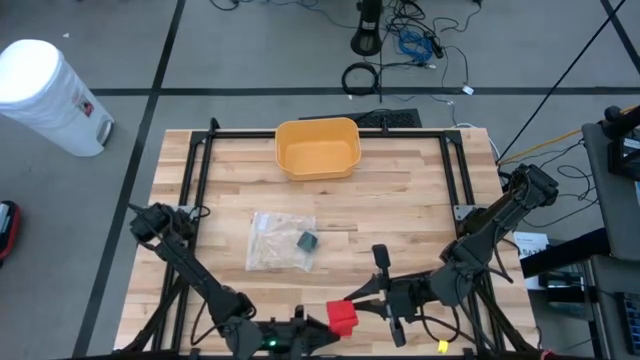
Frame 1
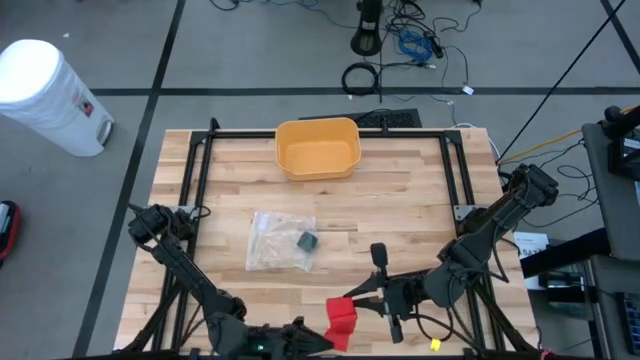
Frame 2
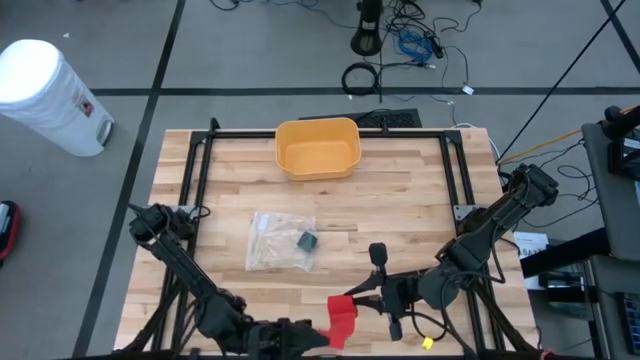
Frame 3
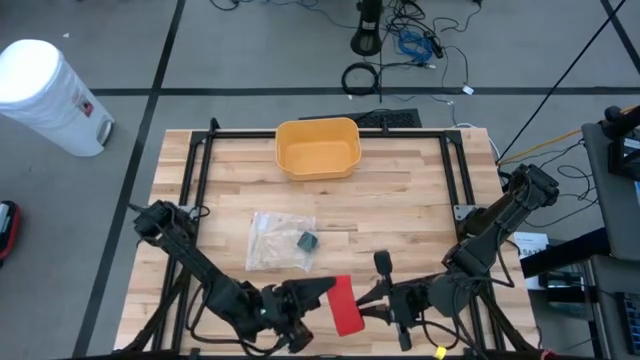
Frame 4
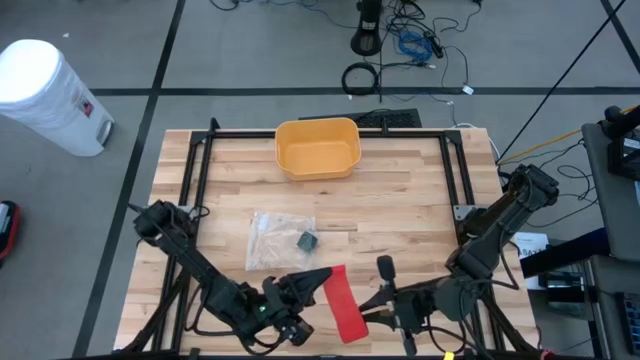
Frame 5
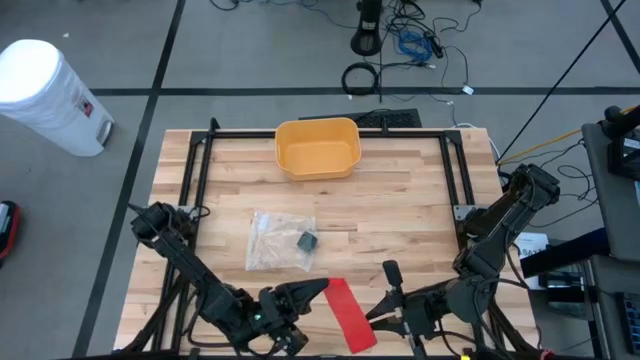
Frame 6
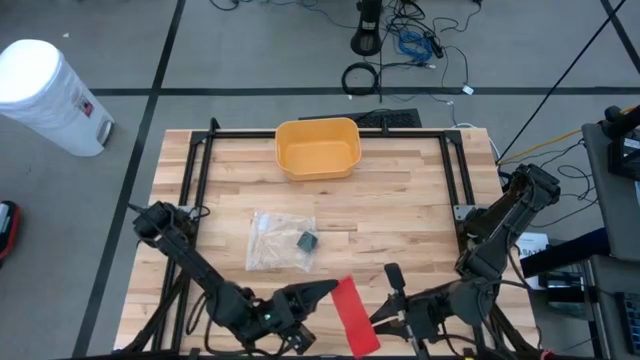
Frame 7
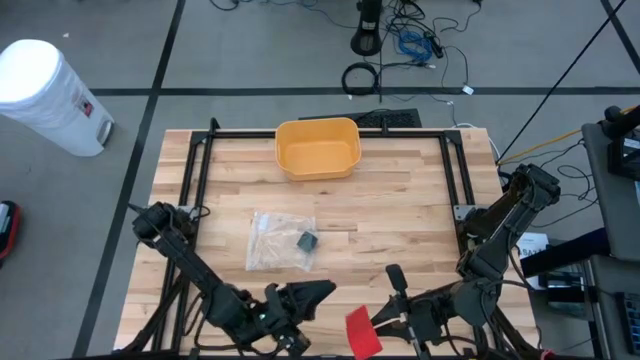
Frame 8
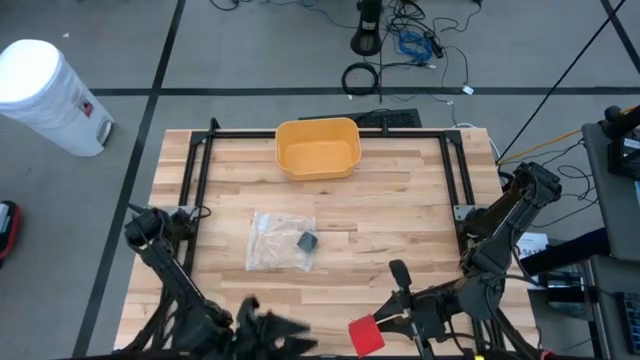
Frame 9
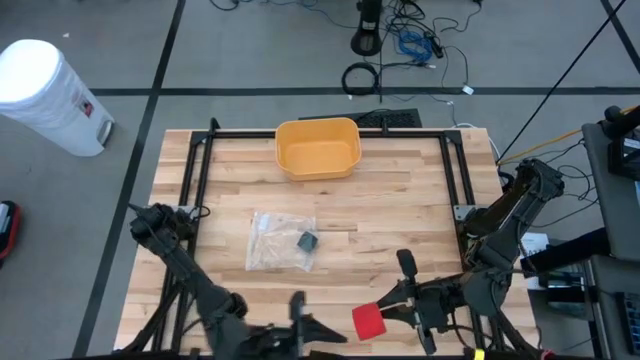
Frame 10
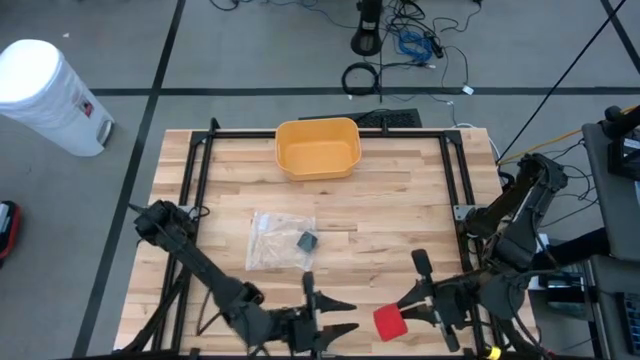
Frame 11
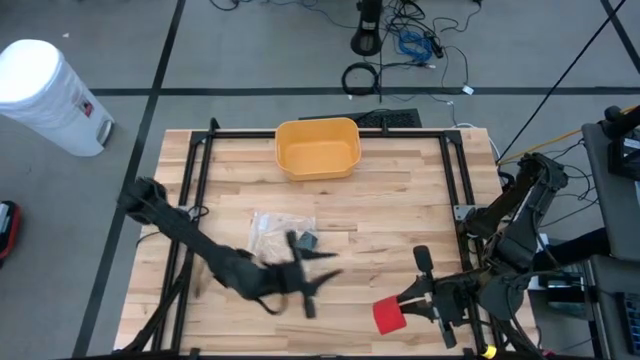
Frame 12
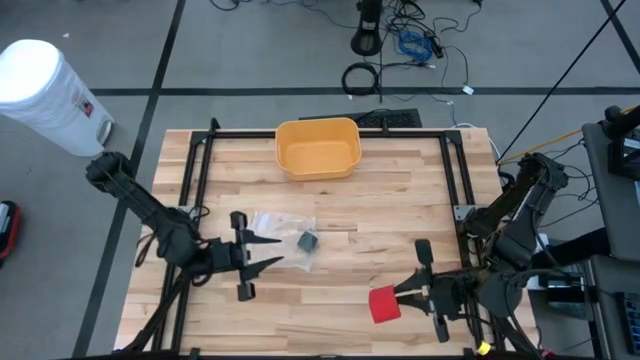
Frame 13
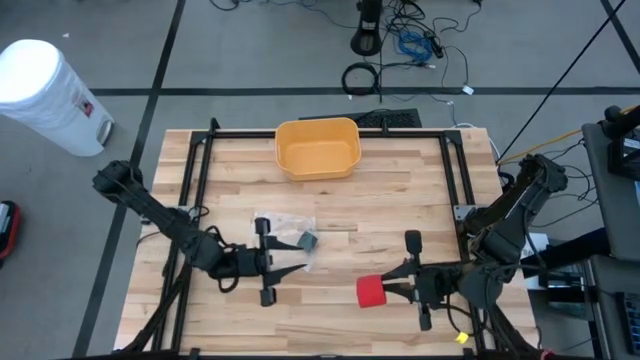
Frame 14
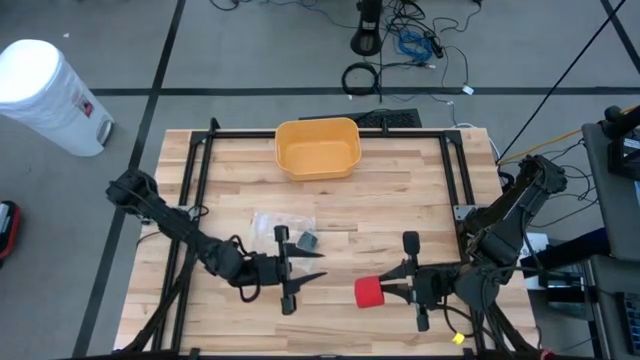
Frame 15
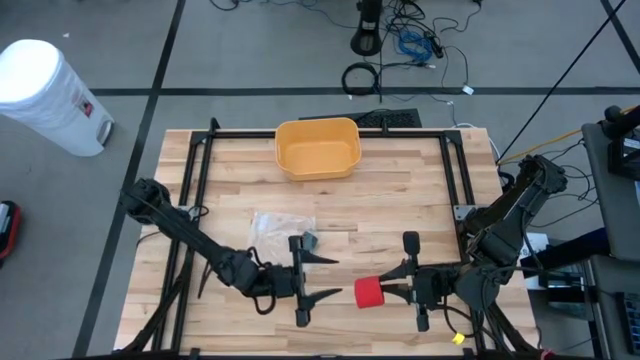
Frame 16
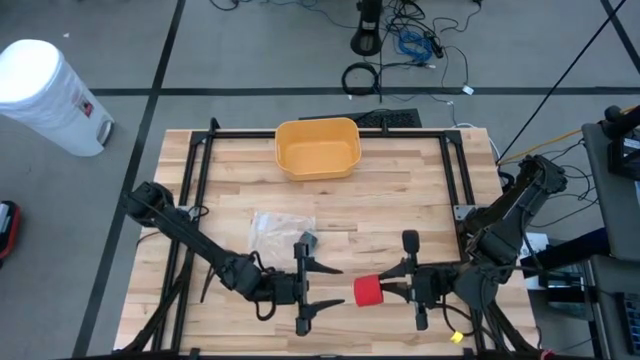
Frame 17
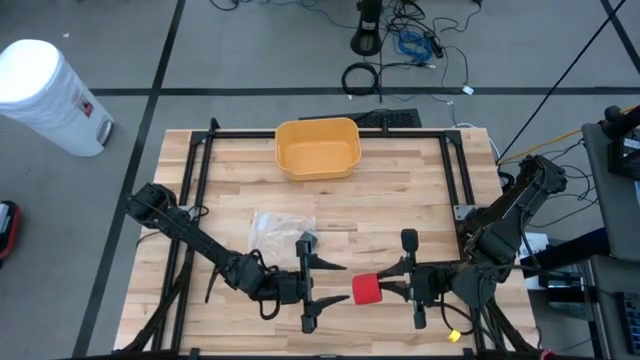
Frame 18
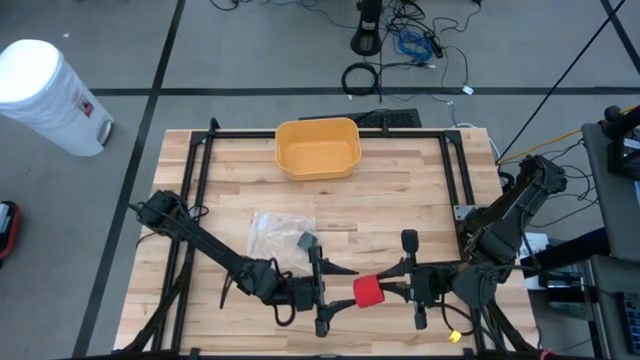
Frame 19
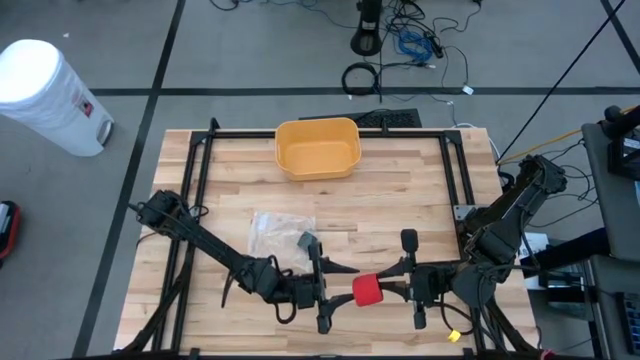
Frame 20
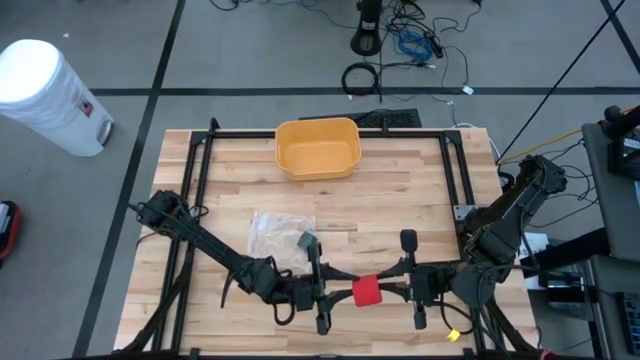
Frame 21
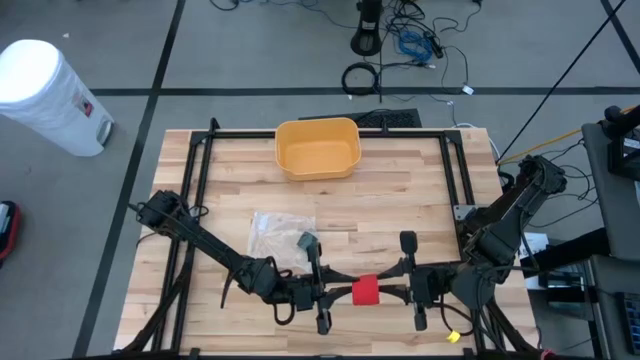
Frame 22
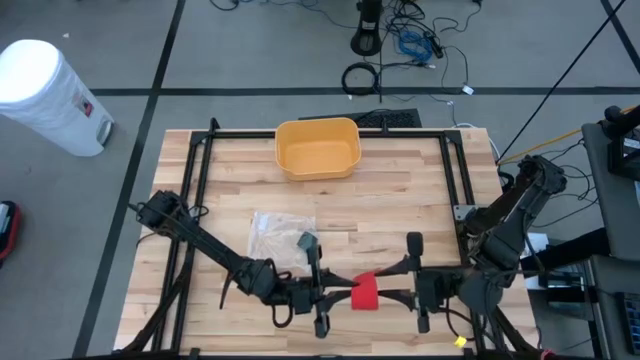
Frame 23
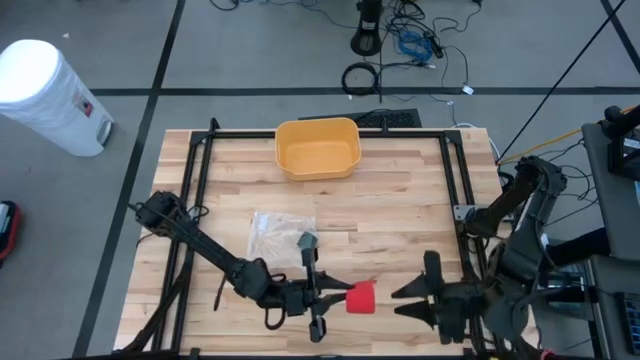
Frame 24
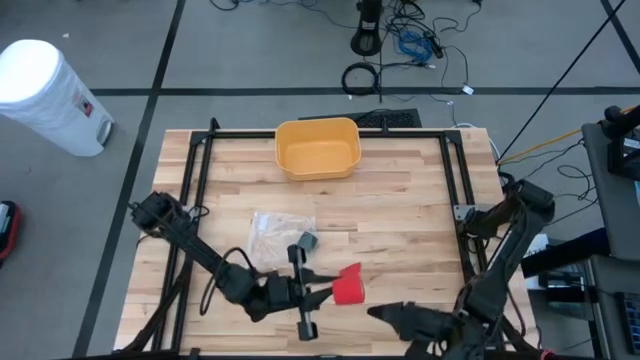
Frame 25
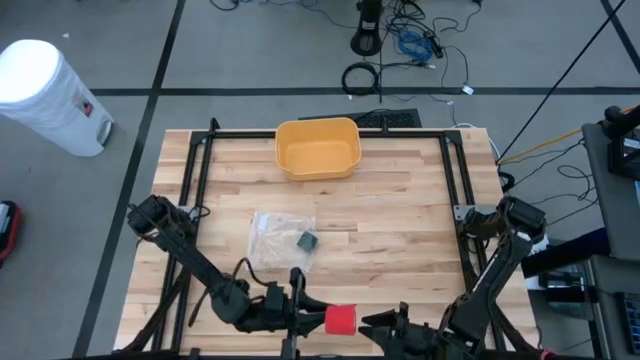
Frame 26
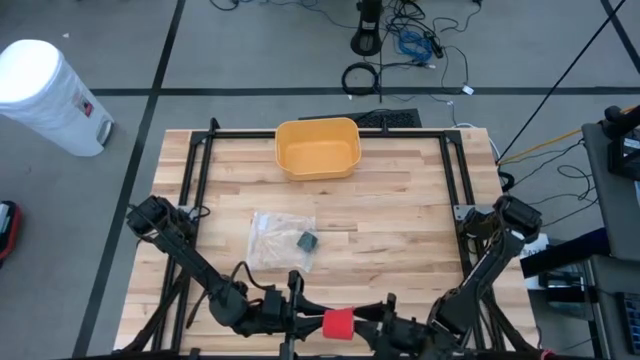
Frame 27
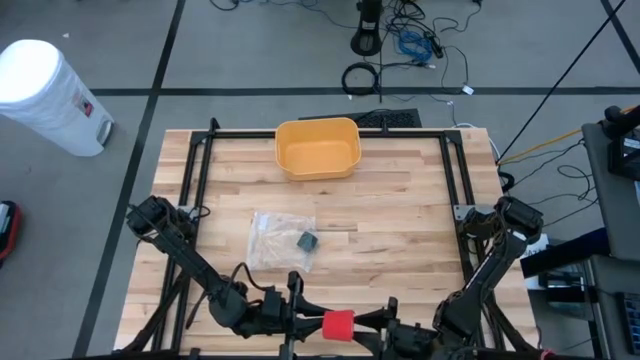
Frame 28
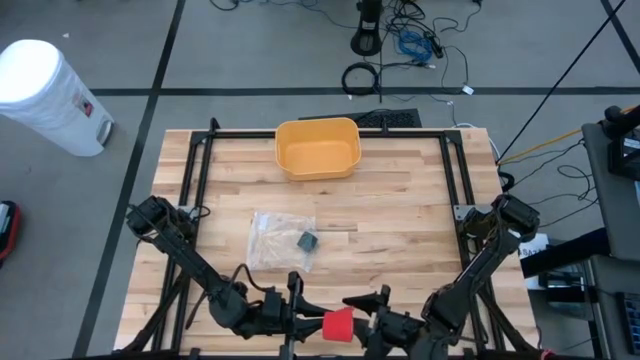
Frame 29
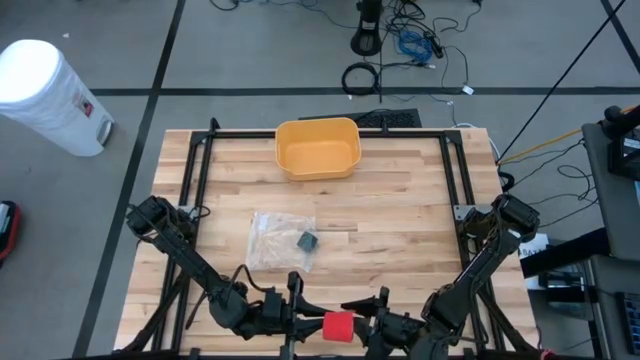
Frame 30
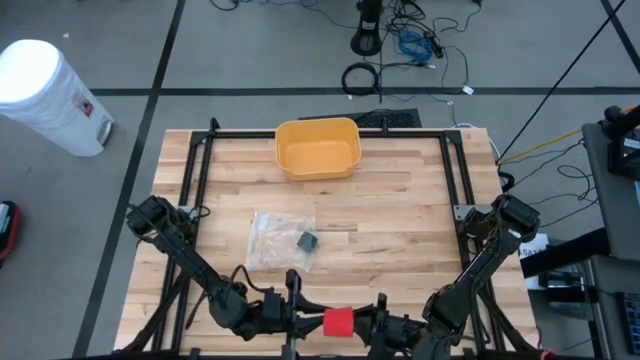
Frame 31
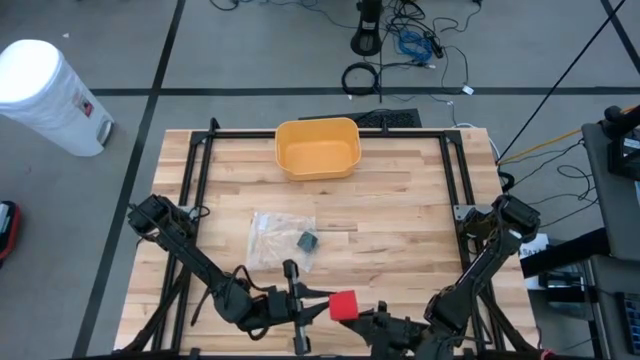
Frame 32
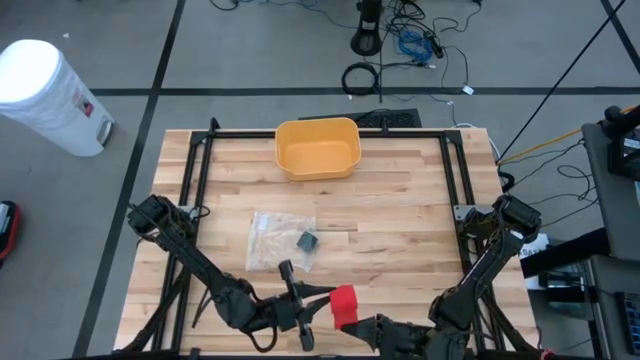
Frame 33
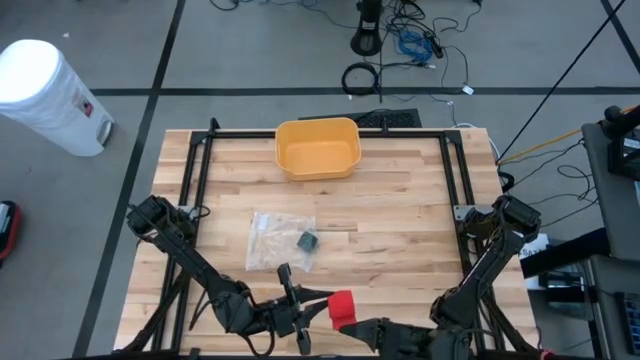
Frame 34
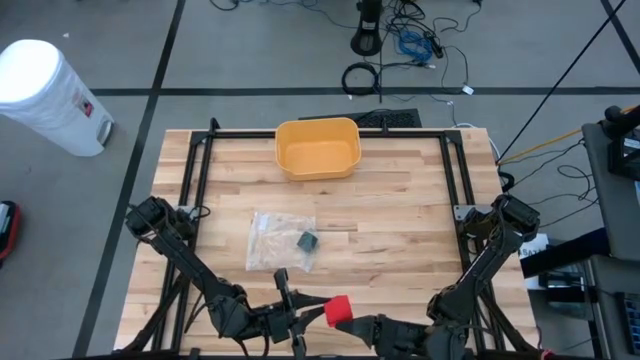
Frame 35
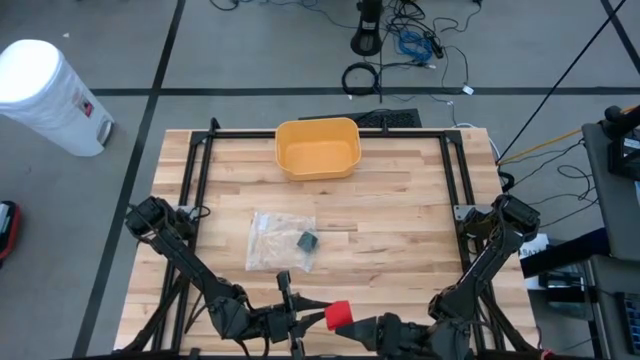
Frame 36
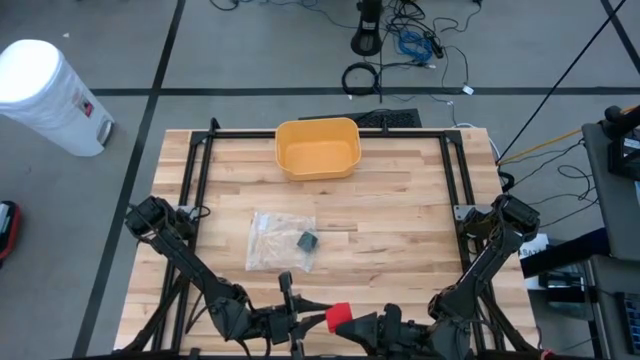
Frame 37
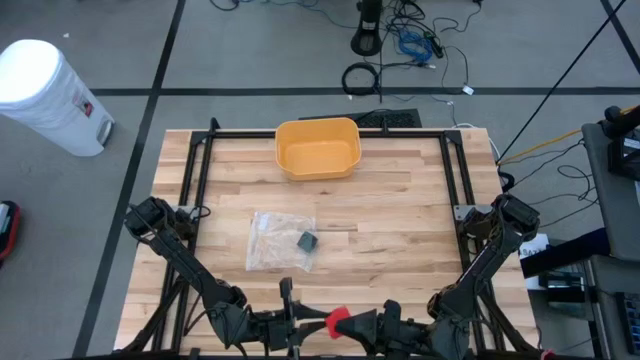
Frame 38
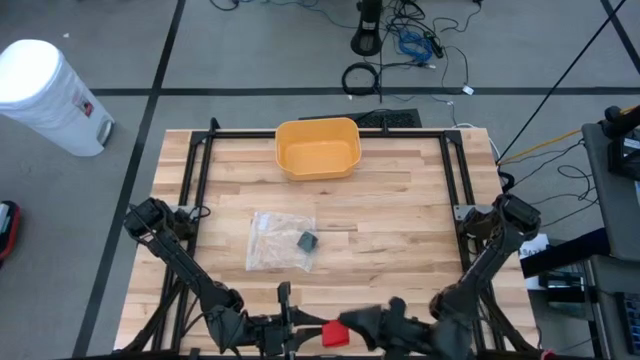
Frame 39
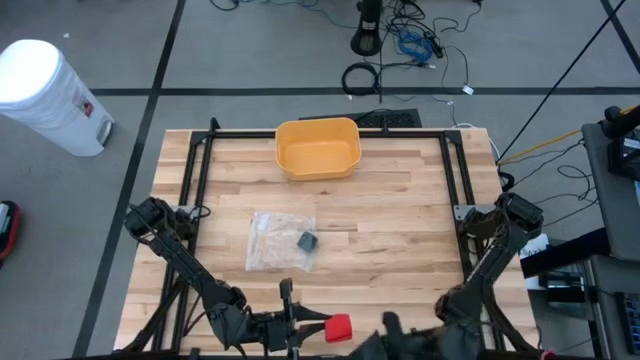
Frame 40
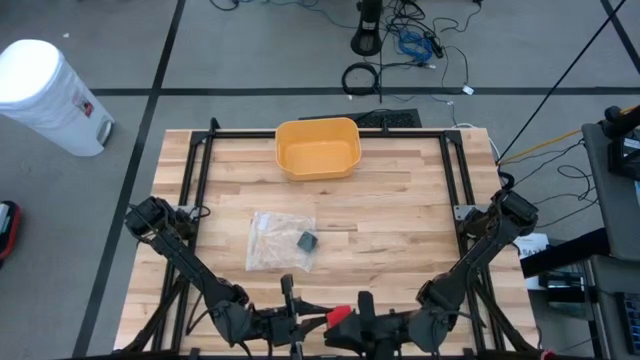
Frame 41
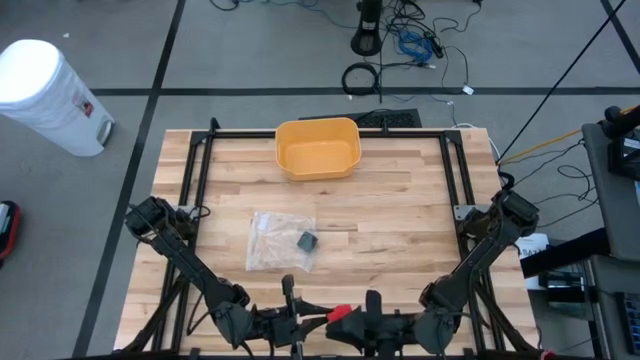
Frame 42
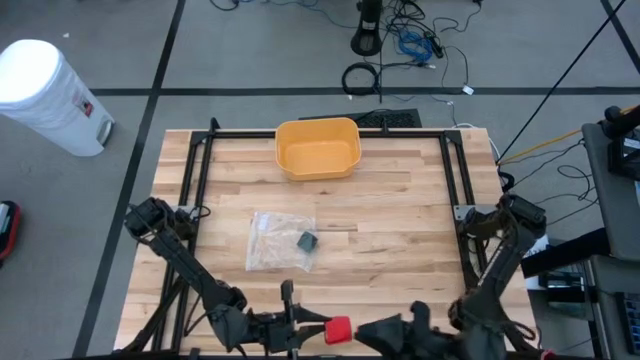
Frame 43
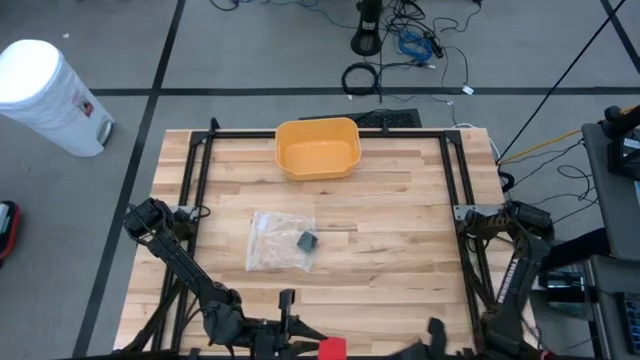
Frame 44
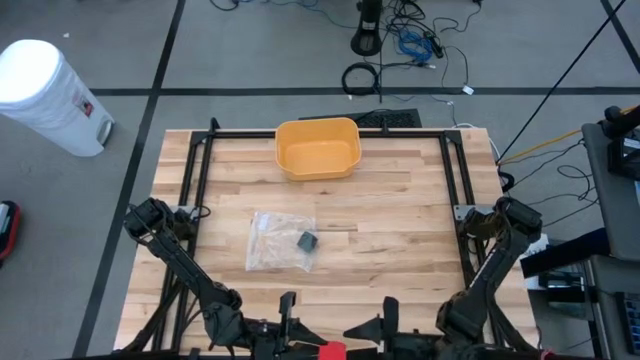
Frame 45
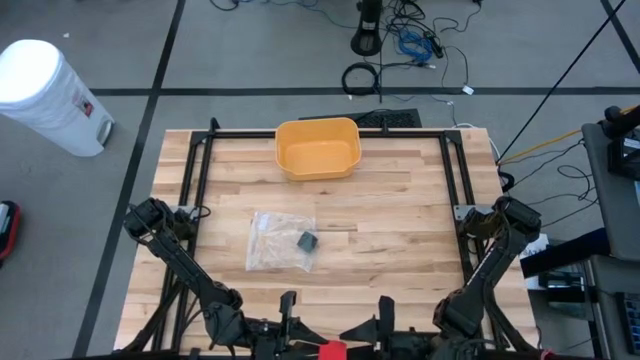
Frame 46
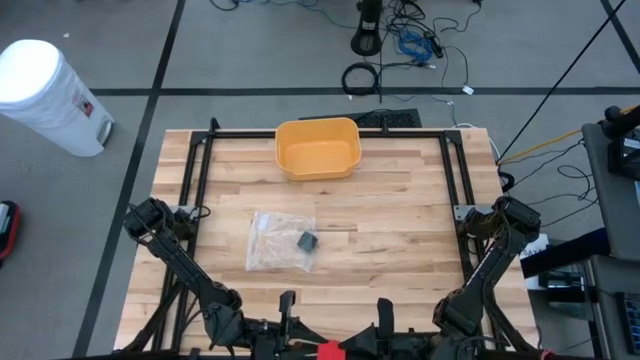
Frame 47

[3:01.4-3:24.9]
Task: Roll bandage
Roll the red bandage
